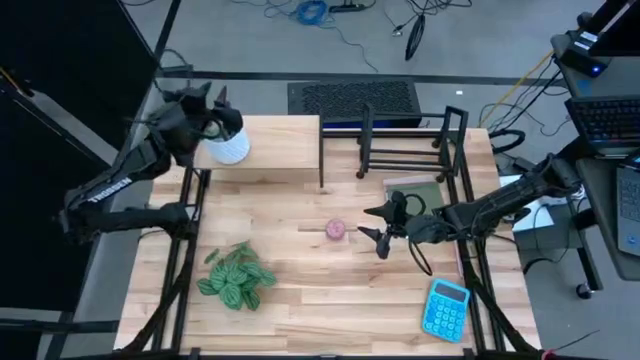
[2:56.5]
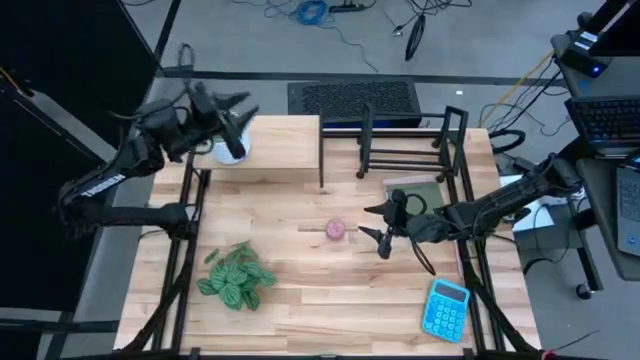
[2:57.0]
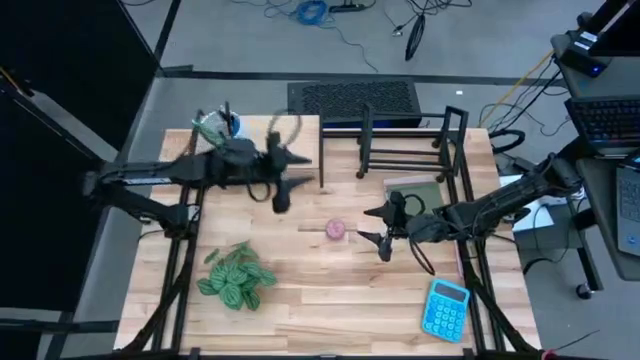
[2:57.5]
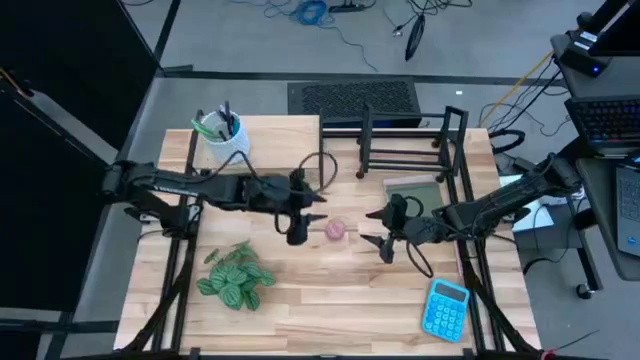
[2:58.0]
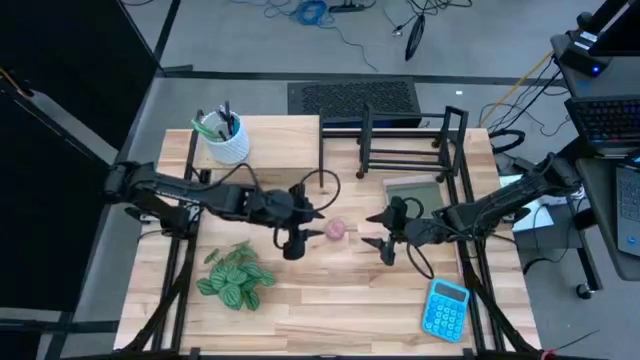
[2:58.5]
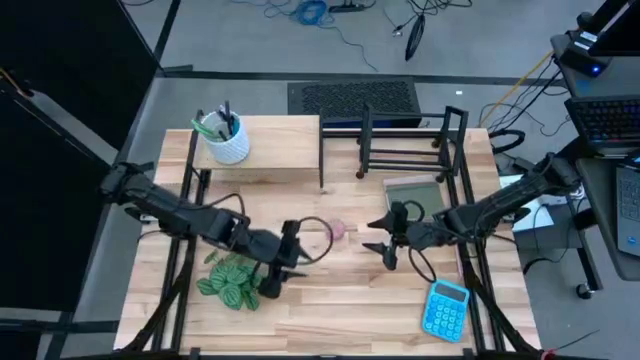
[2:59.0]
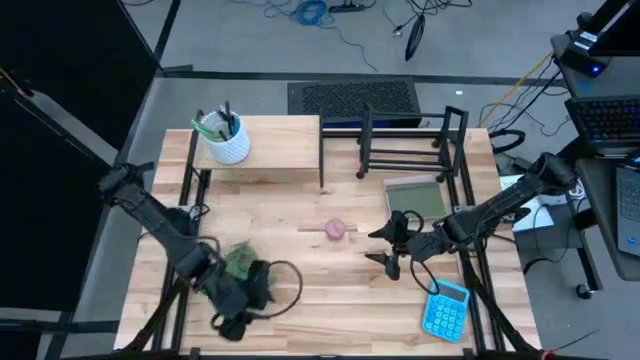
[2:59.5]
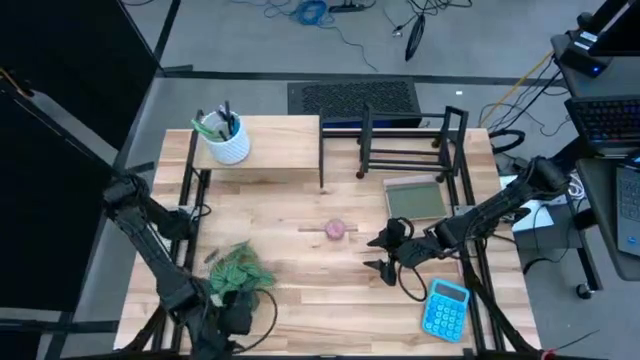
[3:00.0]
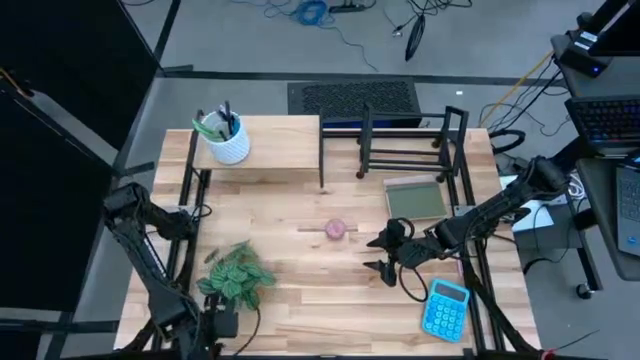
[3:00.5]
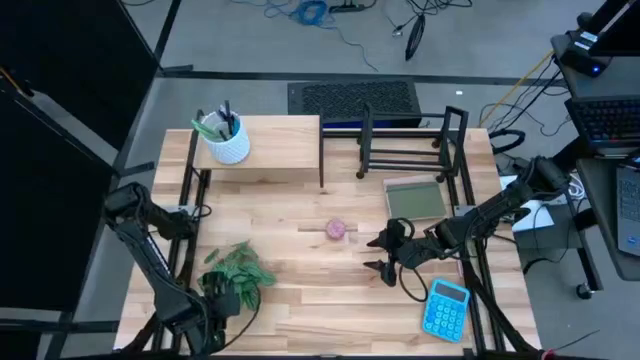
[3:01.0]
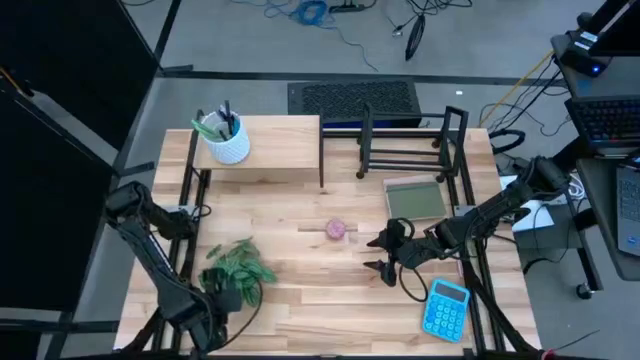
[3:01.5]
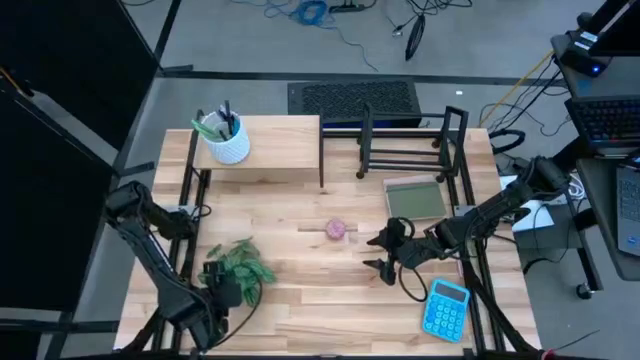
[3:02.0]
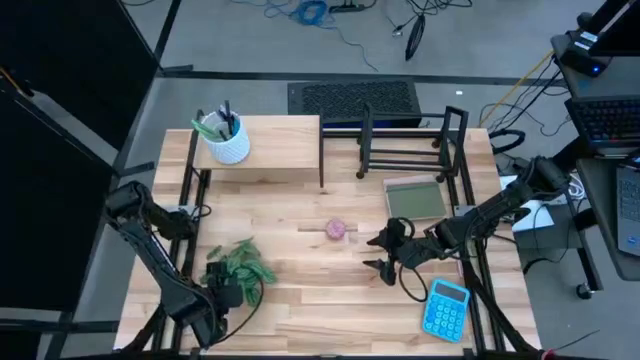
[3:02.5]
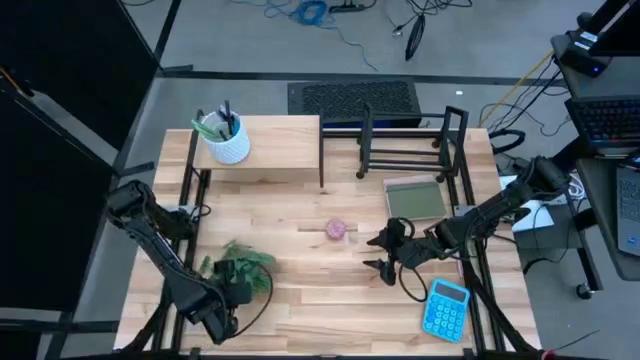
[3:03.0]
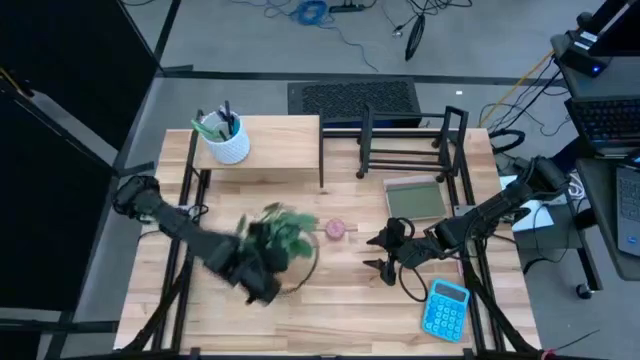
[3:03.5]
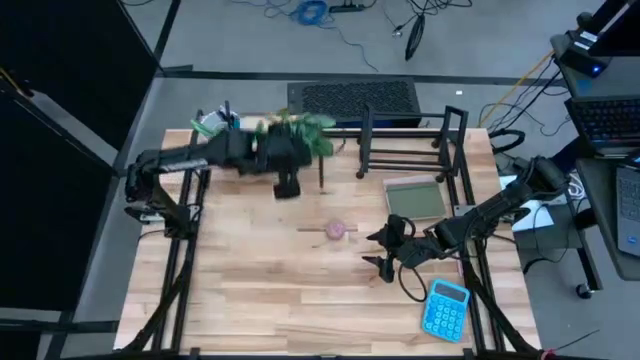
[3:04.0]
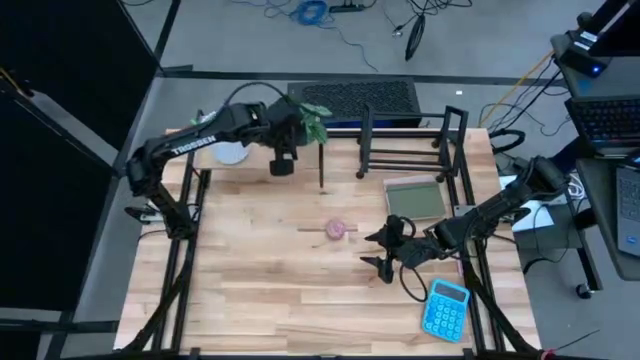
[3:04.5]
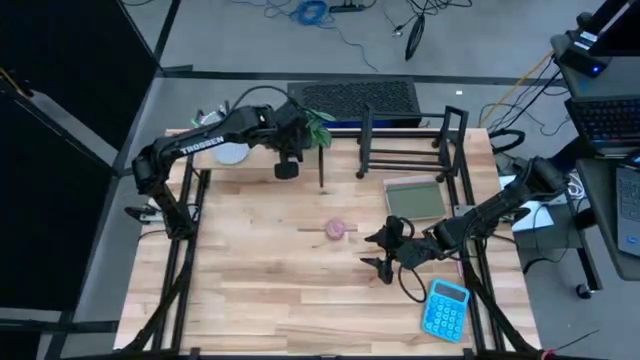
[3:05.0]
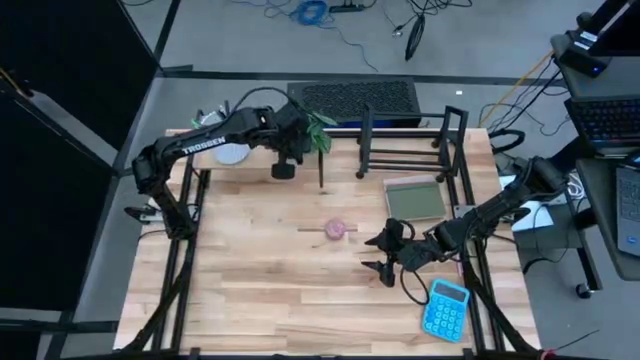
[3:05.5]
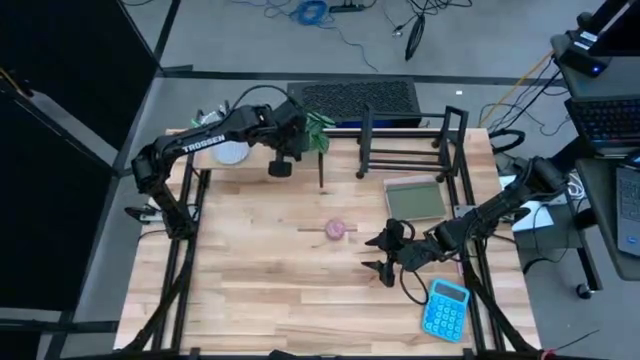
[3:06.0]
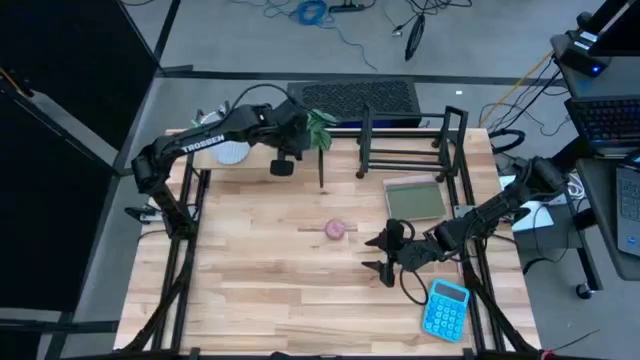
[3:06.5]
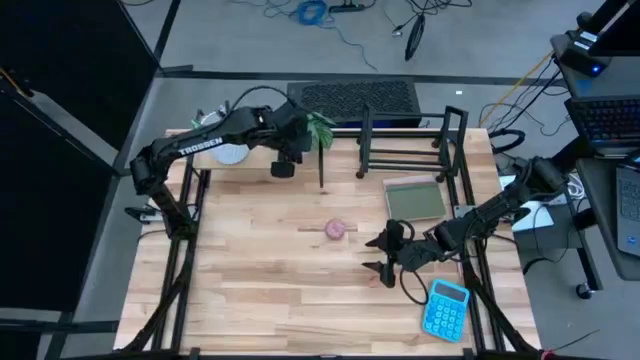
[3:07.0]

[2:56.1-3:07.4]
Task: Stock shelves
Put the white vase plant on the shelf

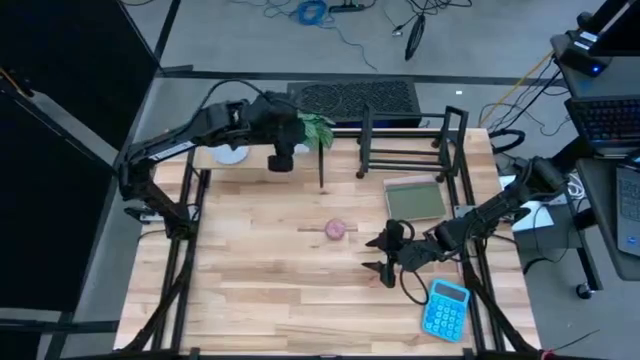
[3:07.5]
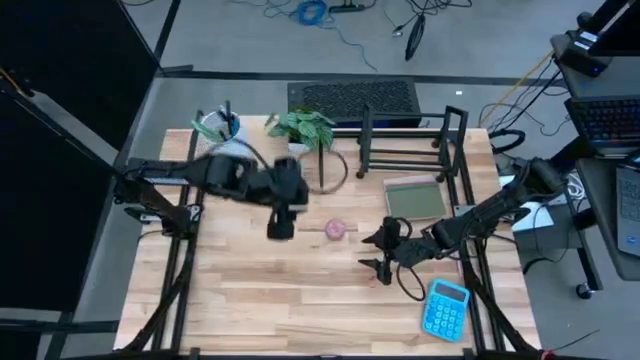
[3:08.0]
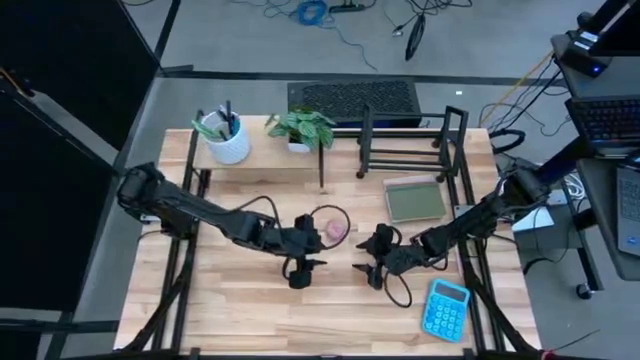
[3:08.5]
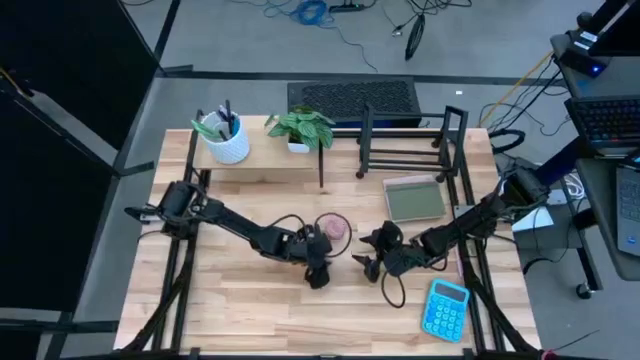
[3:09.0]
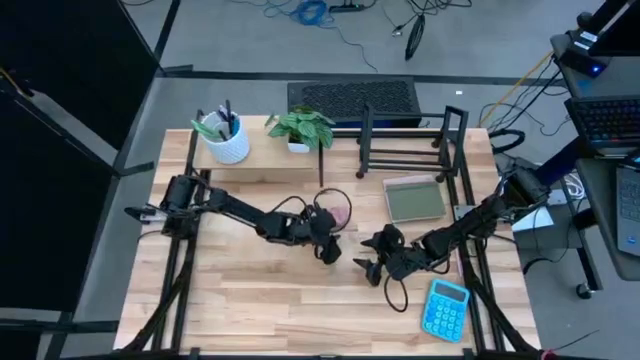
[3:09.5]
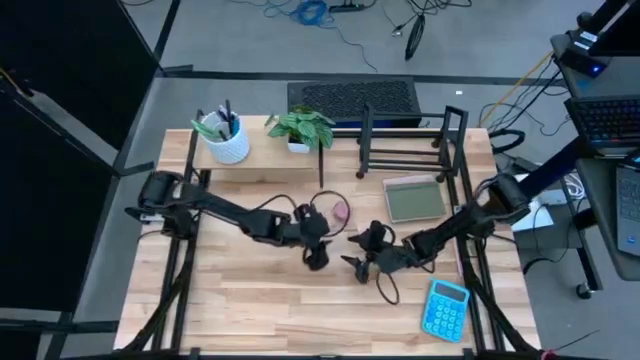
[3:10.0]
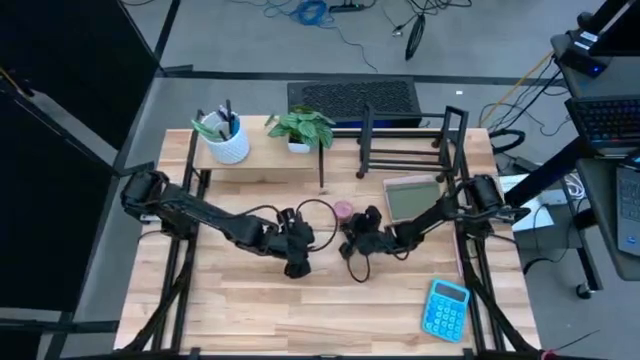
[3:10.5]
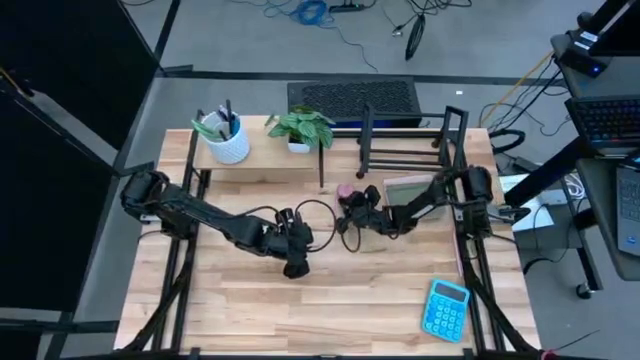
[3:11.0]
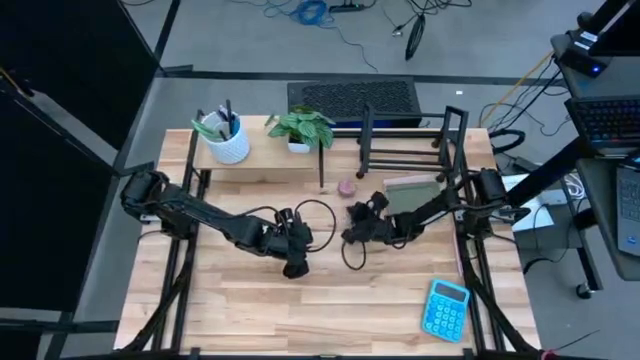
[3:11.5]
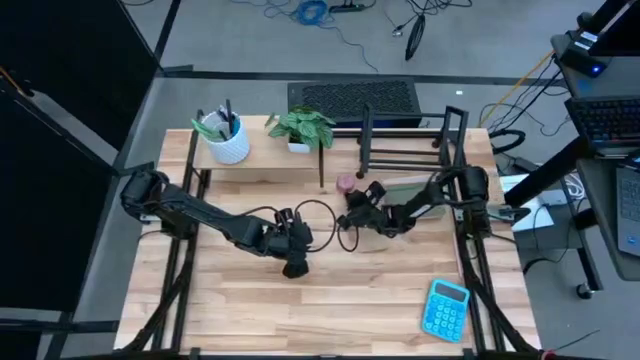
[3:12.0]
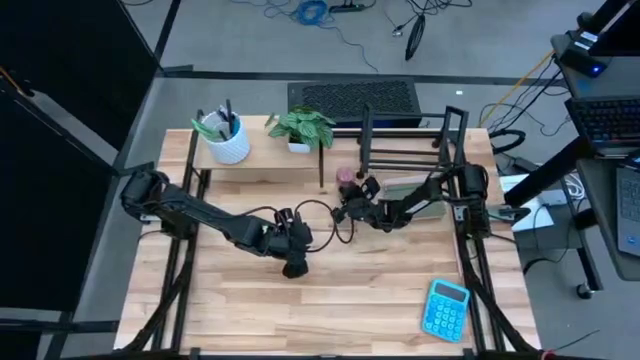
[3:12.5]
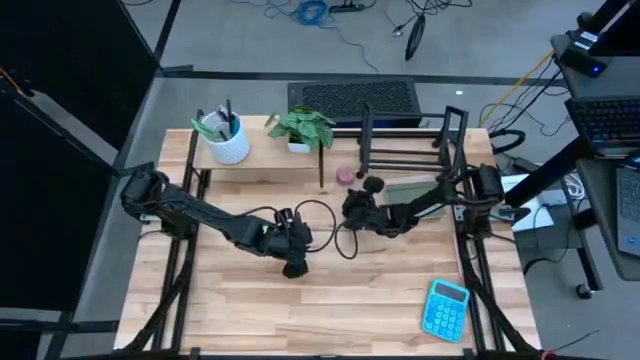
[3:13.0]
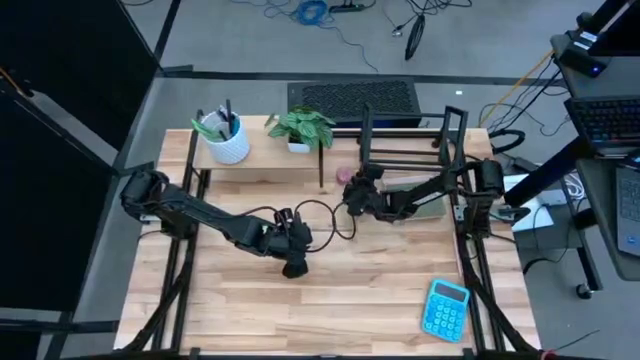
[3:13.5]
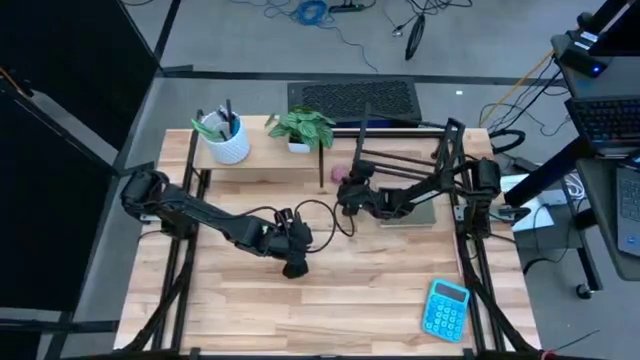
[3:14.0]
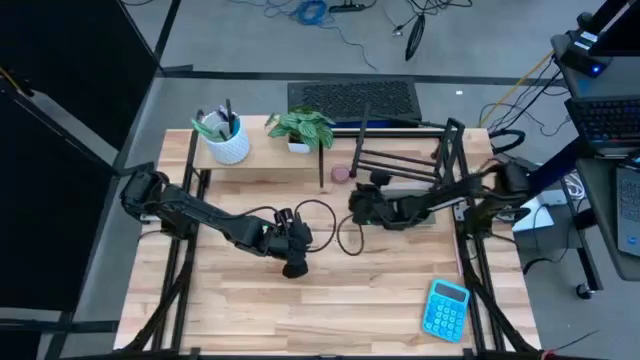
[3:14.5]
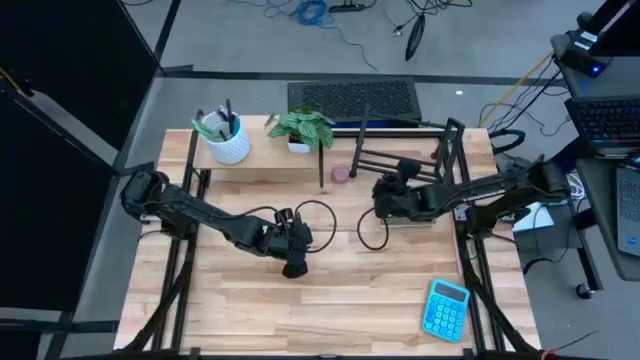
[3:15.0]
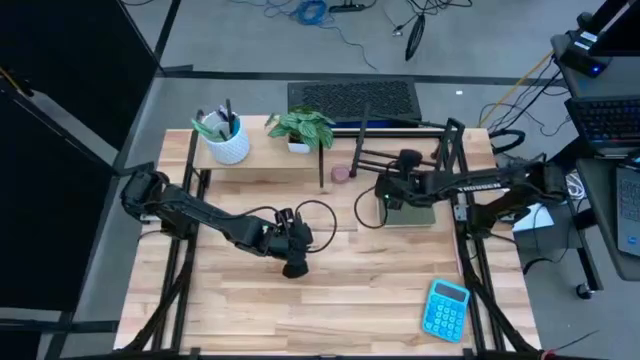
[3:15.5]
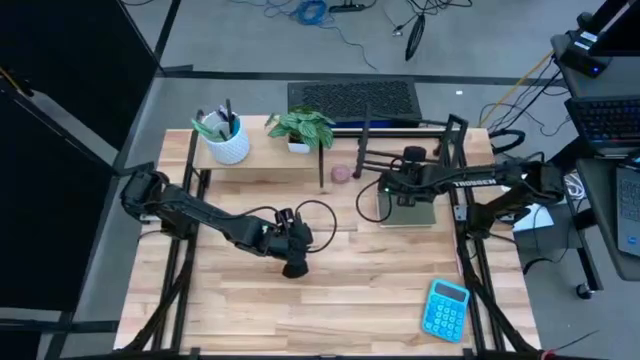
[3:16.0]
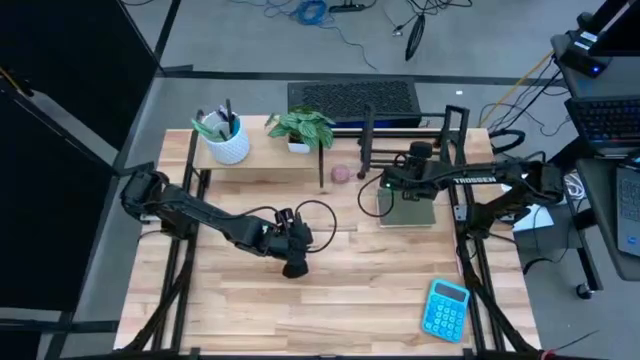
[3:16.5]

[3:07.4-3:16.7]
Move the red scented candle to the the top center

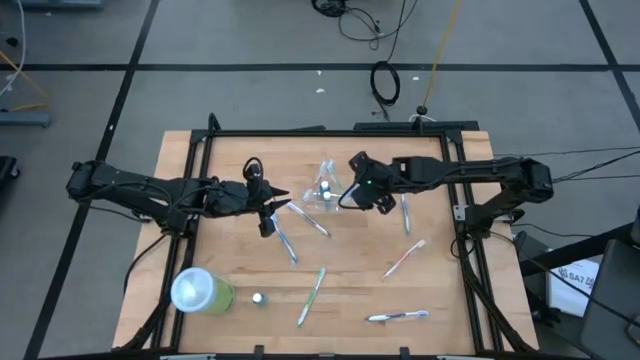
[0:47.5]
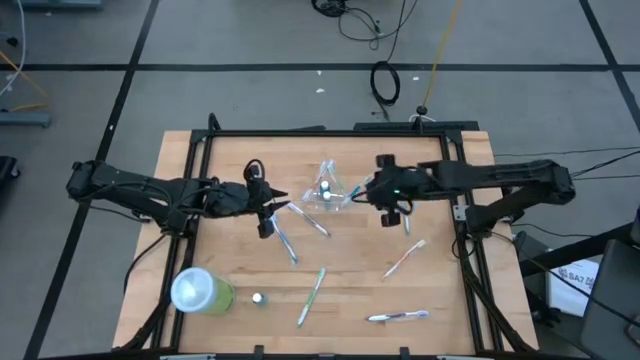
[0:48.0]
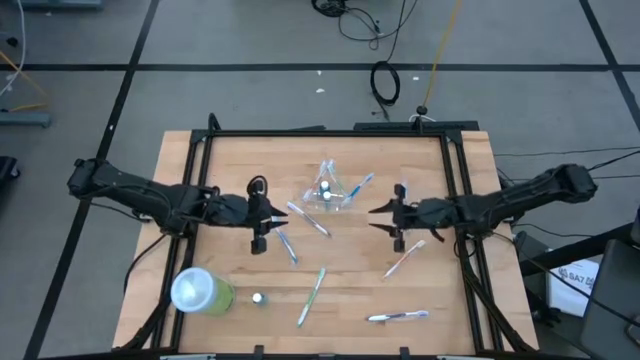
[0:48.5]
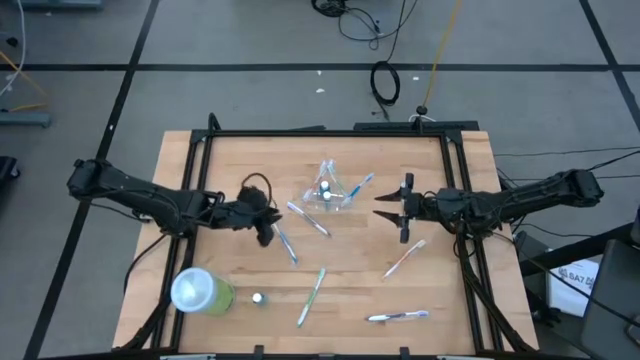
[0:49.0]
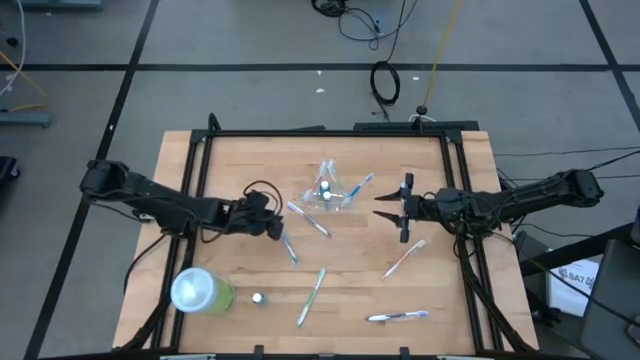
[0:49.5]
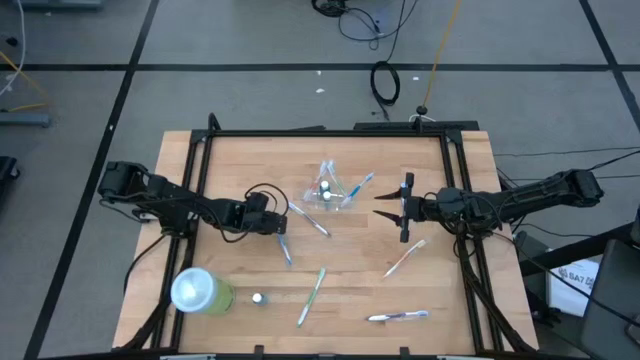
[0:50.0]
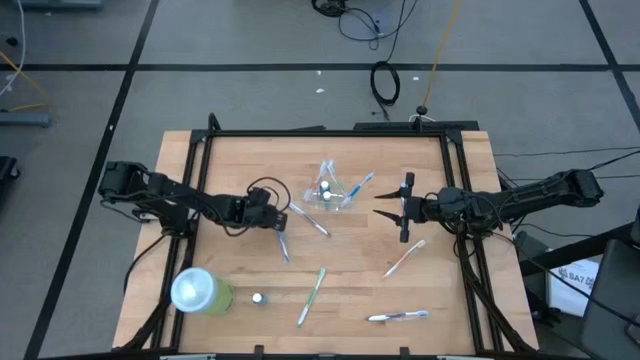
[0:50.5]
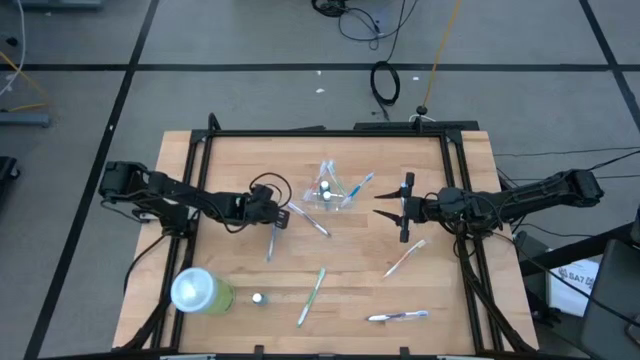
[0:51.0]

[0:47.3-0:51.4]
Task: Pick & Place toothbrushing station
Put the left blue toothbrush into the transparent organizer
